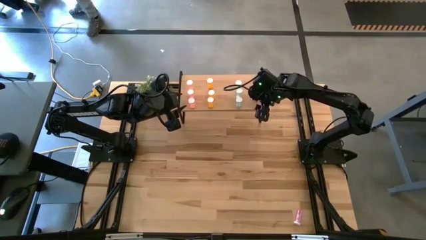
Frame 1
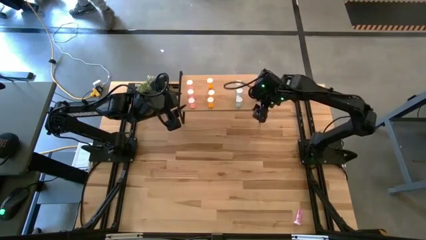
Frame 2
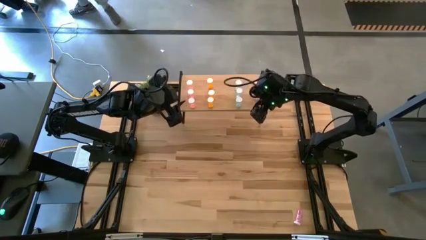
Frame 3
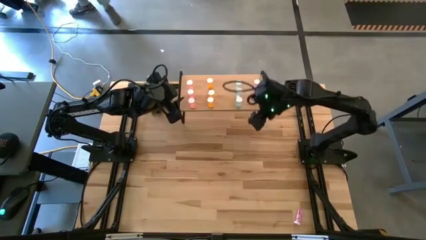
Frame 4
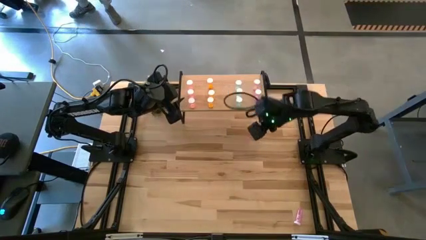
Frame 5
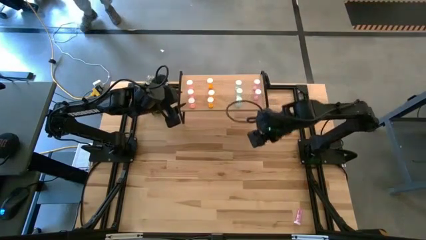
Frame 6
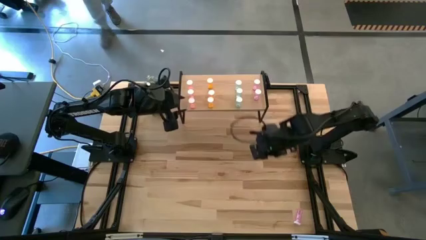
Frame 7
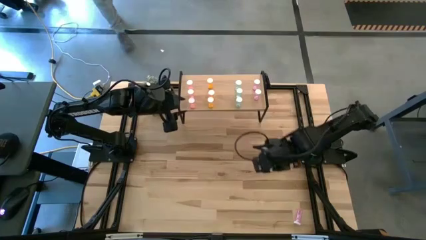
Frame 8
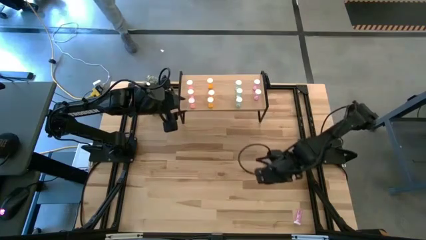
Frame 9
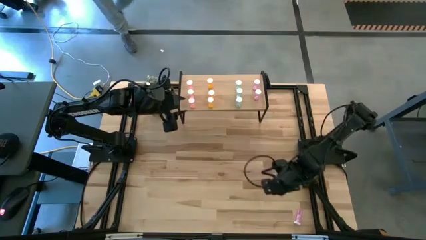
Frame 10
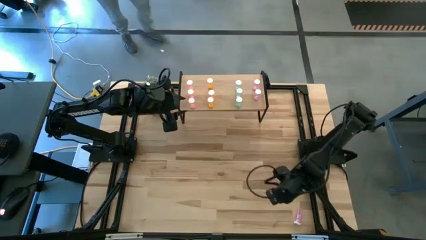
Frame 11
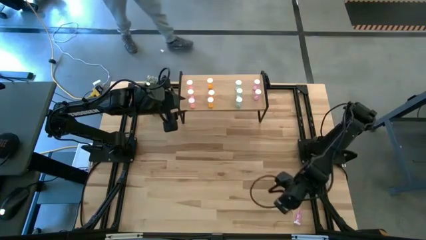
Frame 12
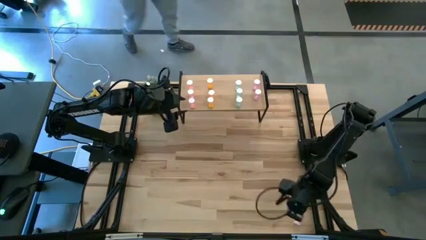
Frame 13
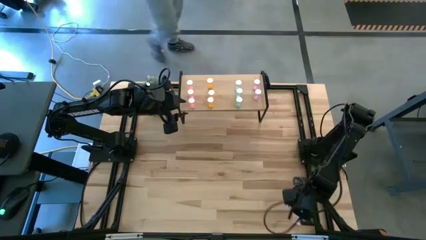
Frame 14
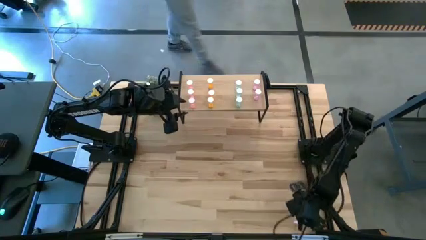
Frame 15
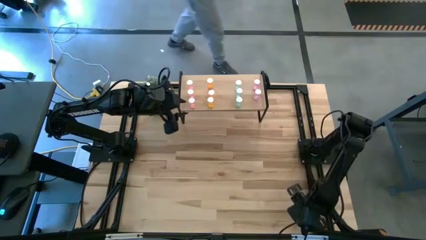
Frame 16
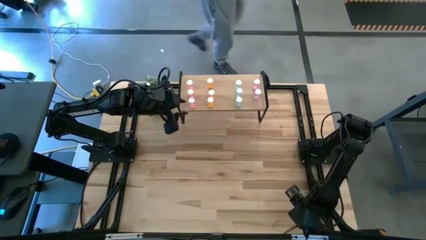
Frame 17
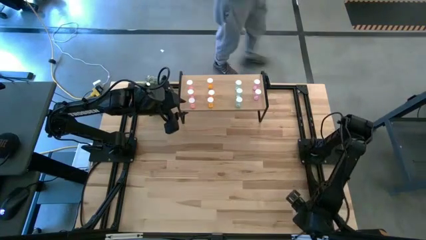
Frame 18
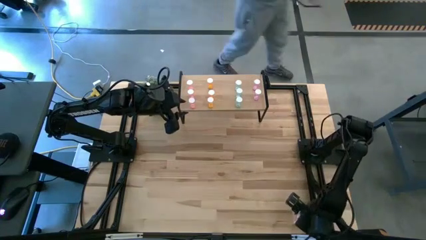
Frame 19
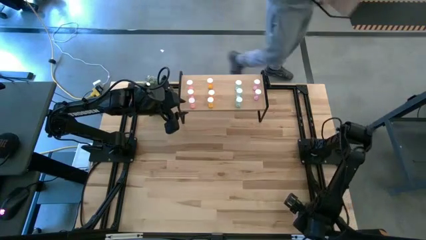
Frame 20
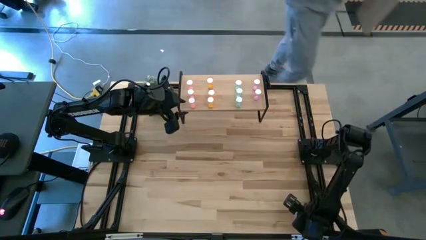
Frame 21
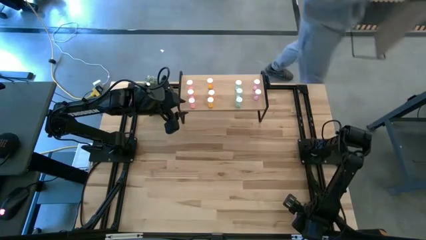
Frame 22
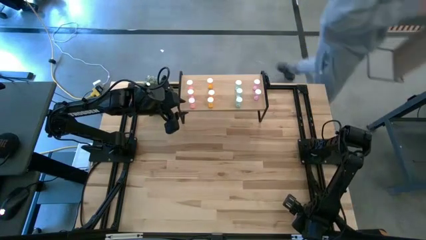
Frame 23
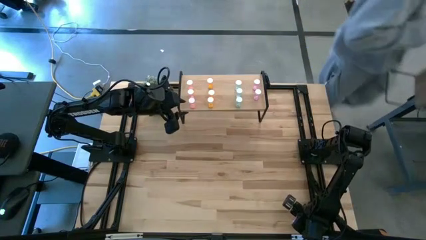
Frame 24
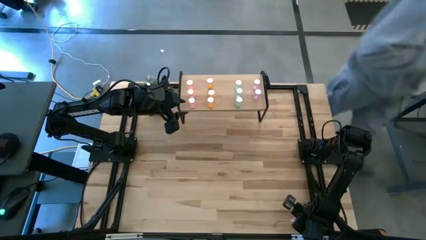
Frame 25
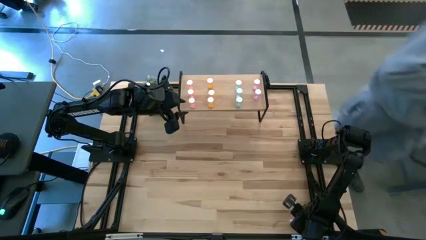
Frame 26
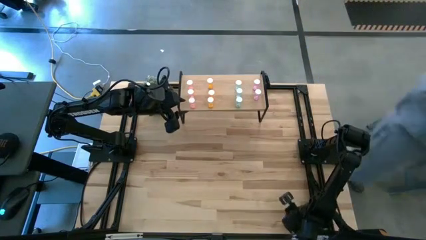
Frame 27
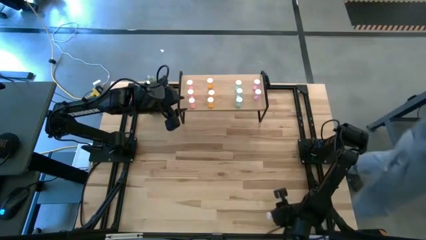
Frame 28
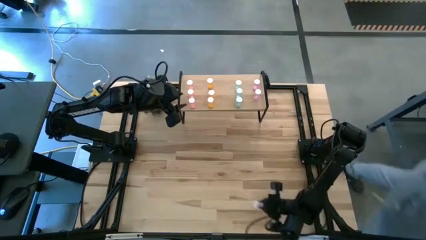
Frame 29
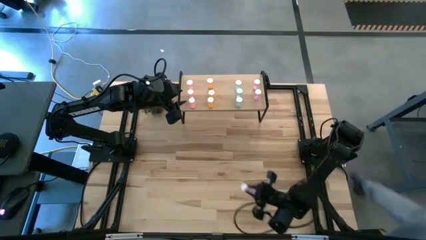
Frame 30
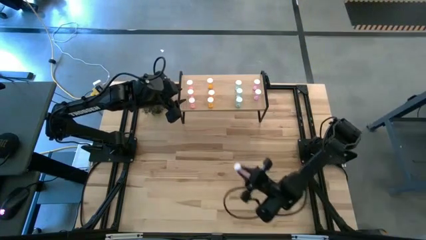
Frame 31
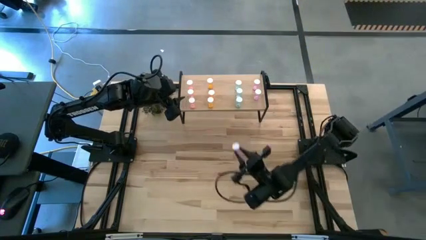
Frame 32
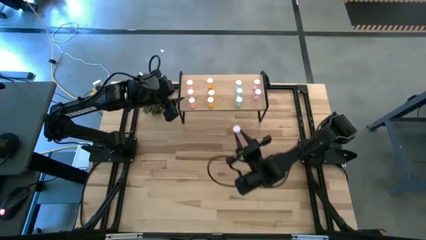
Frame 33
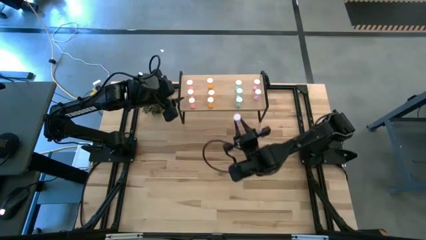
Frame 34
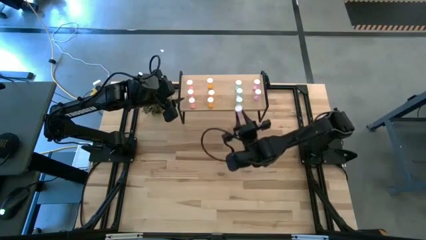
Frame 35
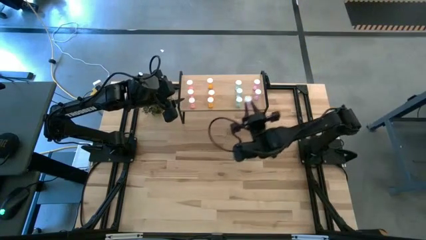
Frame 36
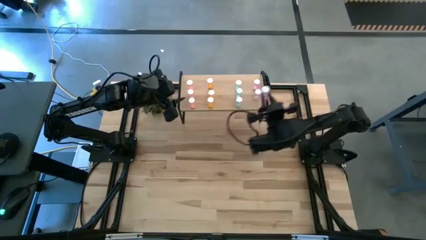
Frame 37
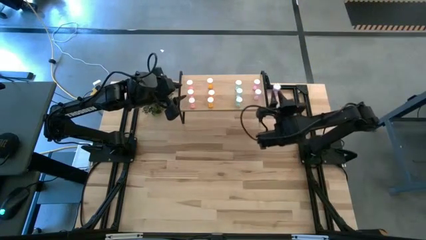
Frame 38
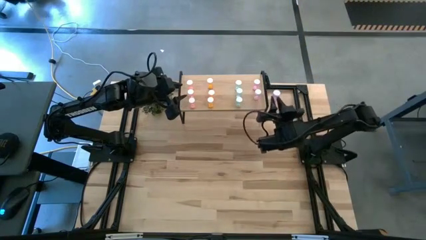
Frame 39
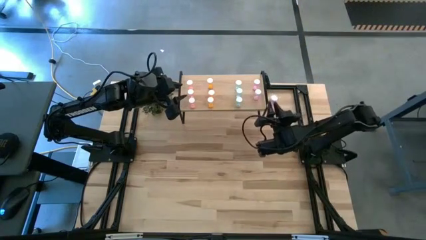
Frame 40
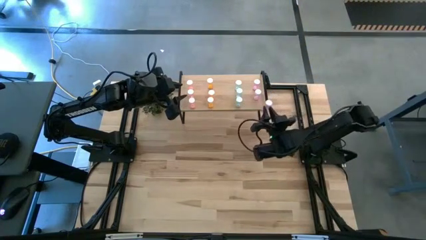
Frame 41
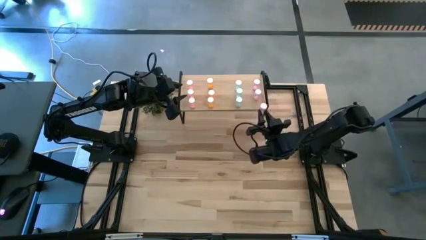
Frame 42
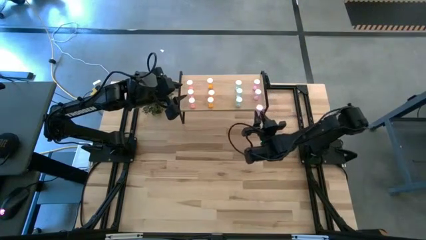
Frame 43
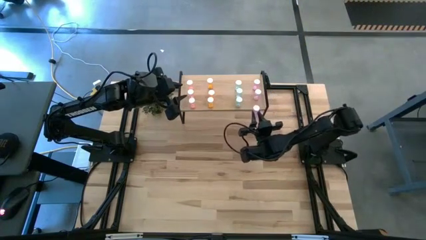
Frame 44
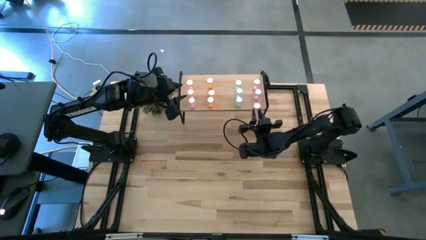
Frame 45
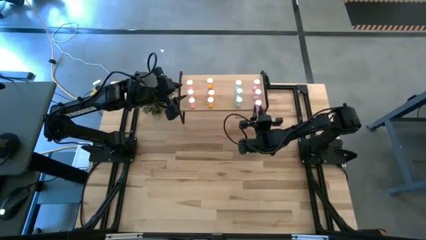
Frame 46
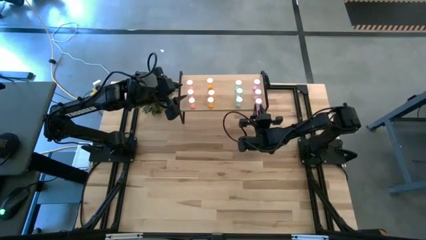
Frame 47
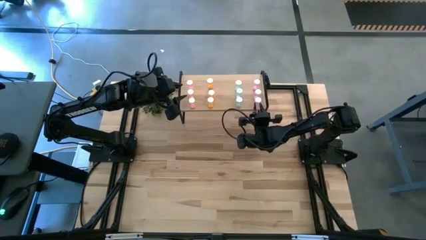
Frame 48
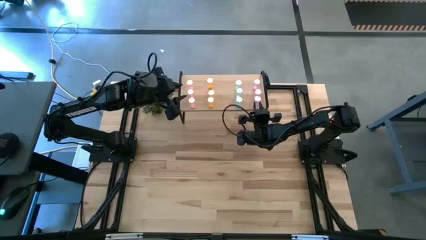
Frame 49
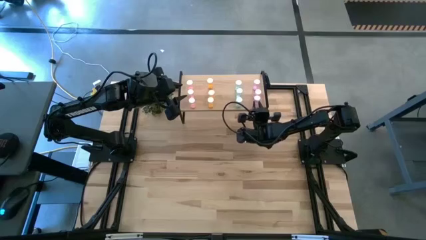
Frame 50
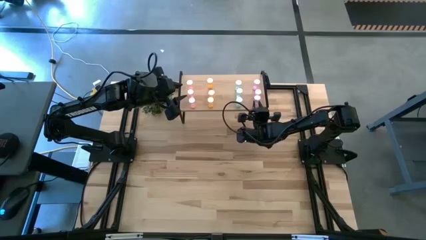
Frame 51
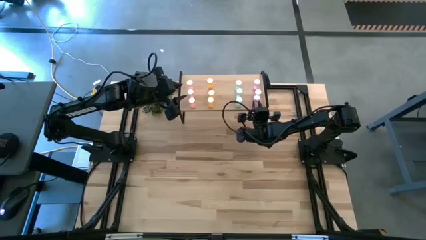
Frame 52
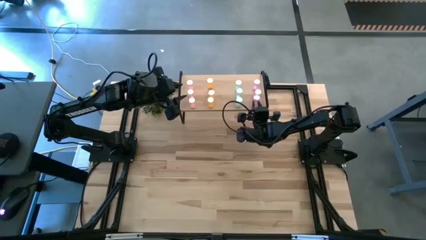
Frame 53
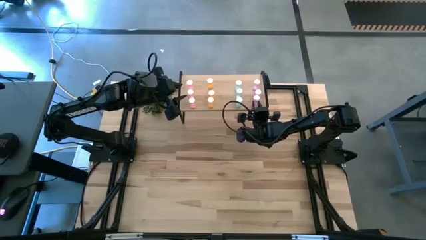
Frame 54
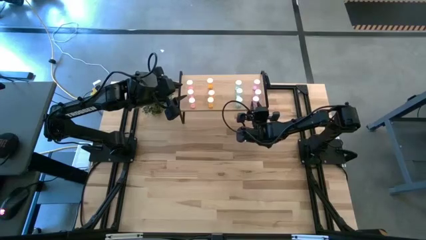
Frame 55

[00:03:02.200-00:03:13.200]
Task: Pick and place medicine bottles onto shelf by color
Put the top violet pill bottle on the shelf aligned with the other violet pill bottle
